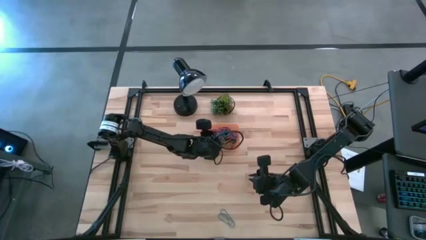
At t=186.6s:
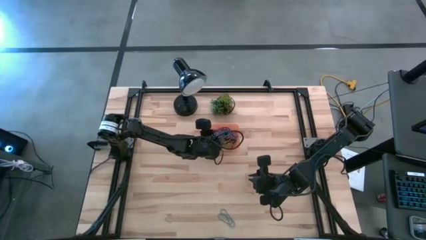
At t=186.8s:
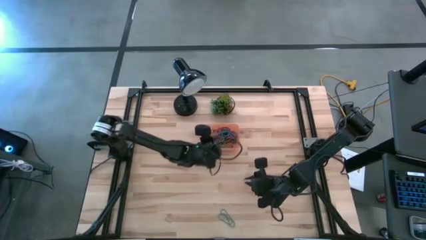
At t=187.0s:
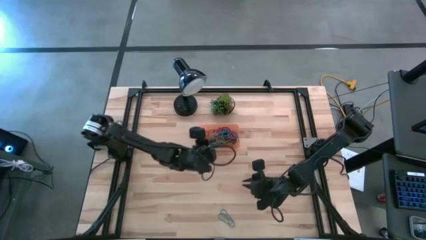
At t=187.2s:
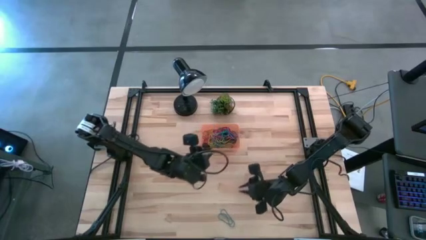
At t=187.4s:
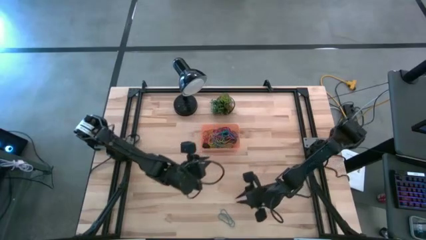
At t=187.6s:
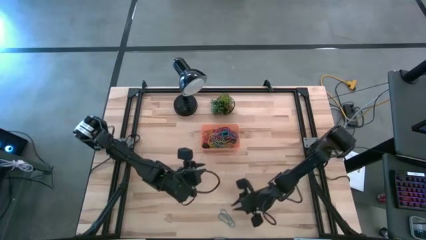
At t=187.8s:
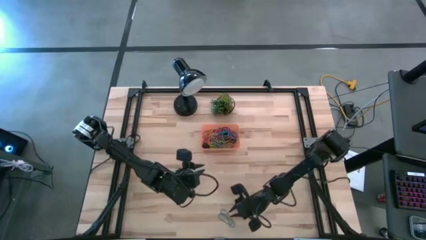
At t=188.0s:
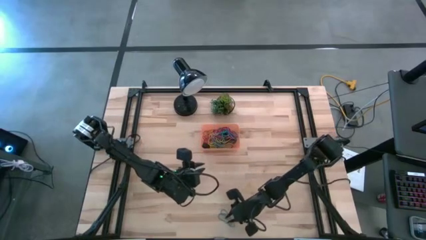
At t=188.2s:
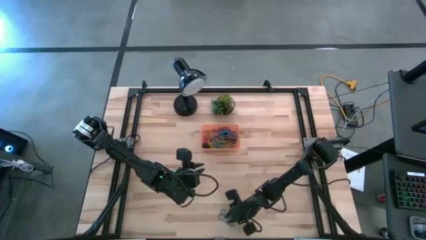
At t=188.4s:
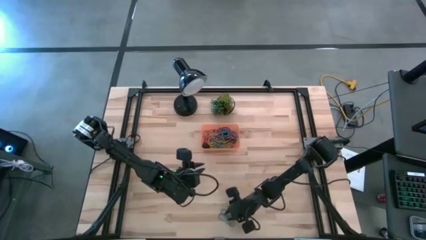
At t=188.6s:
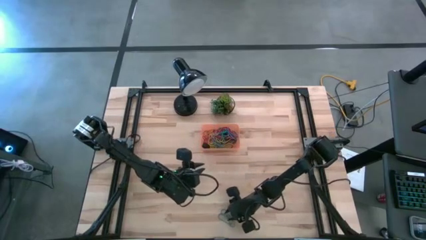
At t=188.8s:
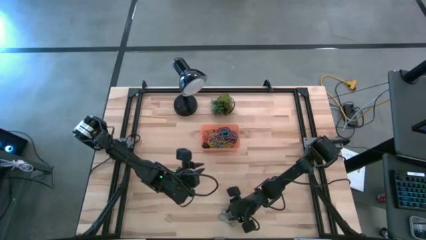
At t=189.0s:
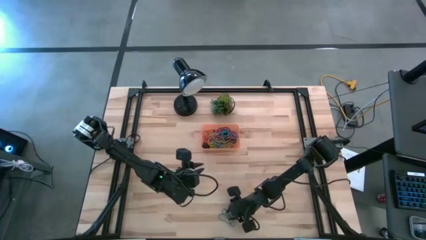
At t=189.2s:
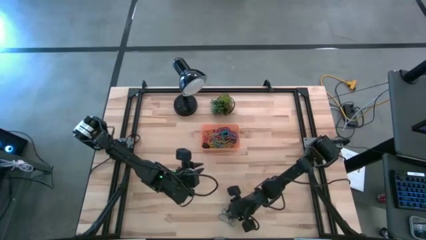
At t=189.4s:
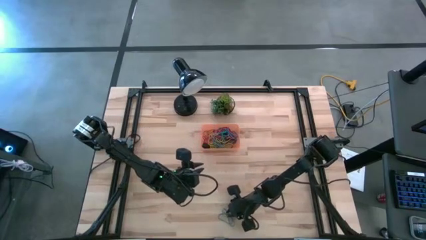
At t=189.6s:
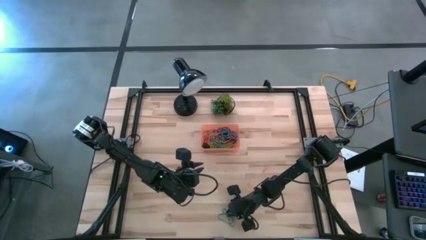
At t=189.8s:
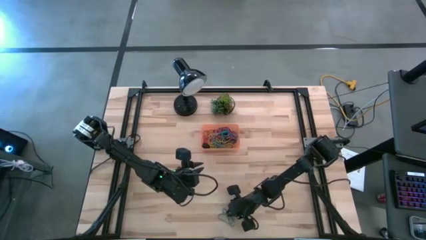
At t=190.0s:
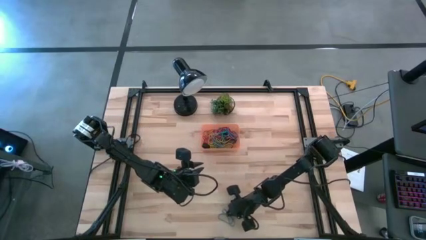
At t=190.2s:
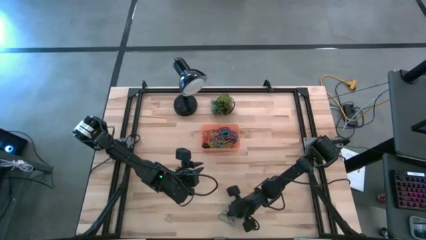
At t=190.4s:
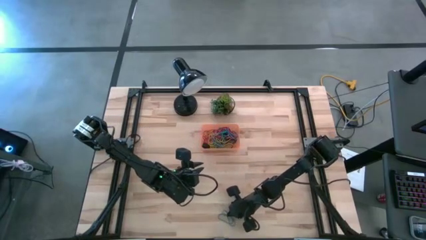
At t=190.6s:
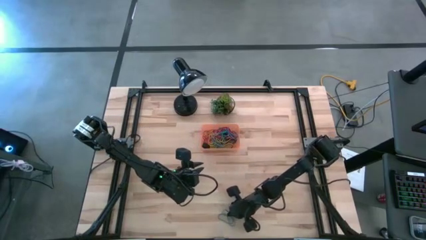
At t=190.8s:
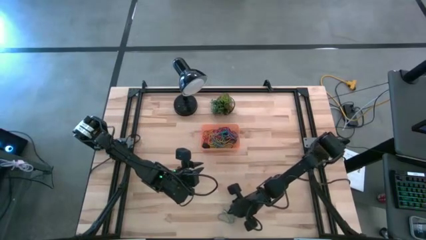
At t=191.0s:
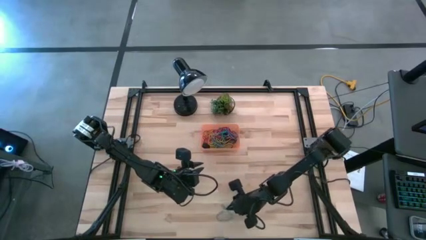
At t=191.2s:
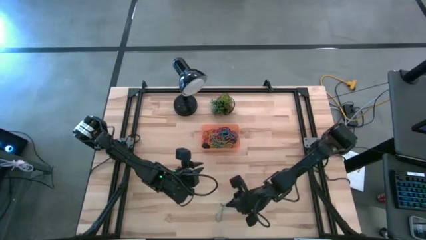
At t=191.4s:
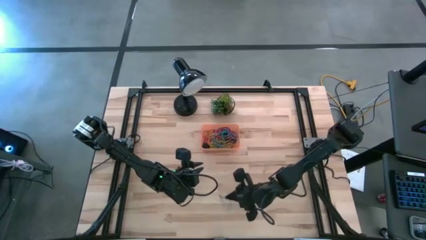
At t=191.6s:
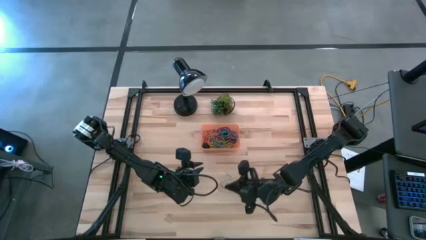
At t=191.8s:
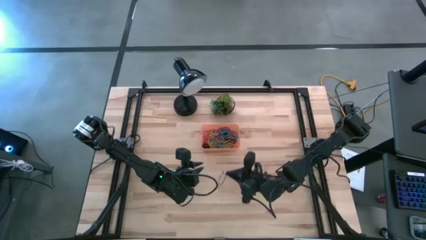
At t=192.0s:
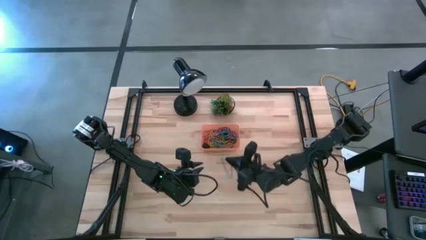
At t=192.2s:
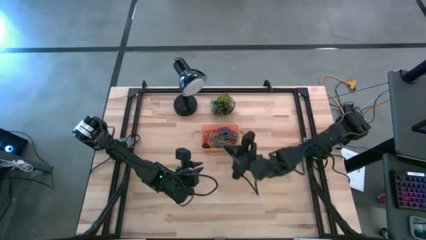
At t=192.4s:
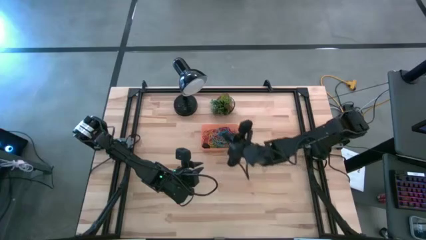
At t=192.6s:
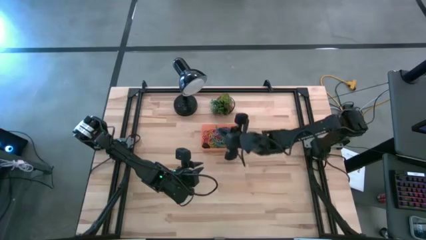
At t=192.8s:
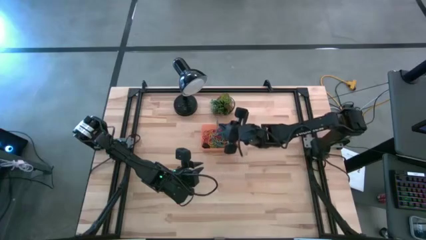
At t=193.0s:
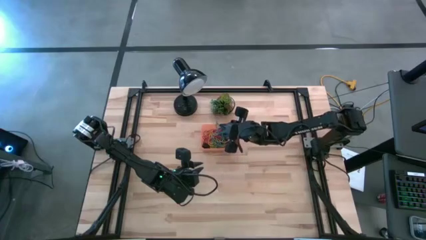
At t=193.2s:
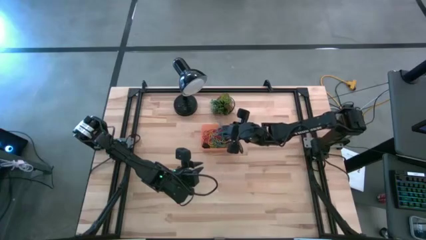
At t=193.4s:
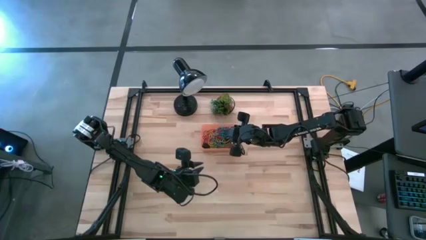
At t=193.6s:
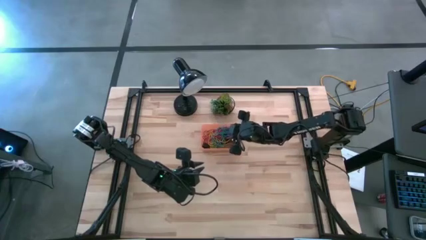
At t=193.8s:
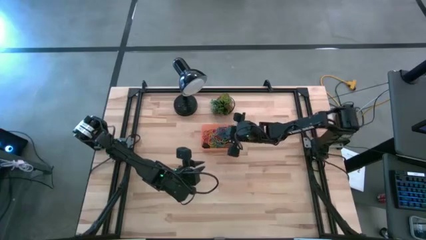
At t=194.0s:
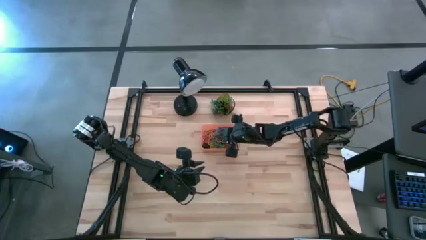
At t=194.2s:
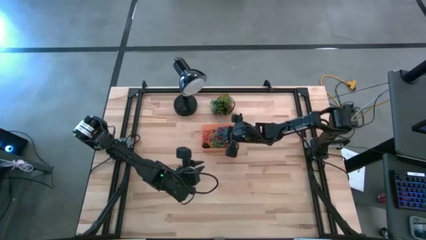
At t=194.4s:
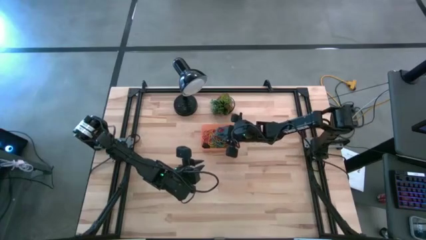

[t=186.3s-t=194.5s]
Task: Pick and place rubber bands into bin
Put the blue rubber band into the orange bin

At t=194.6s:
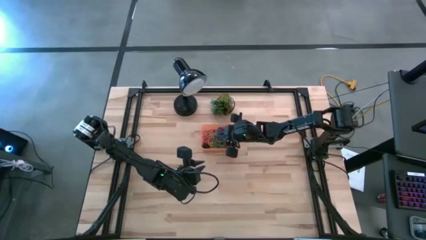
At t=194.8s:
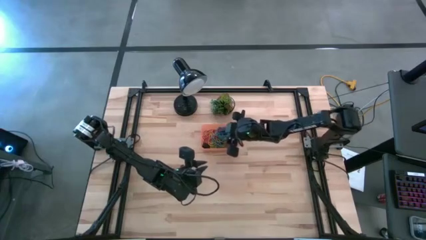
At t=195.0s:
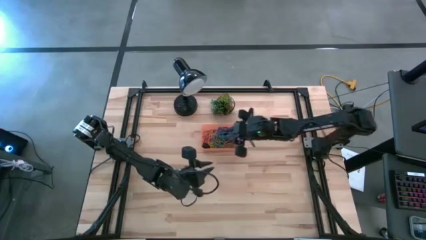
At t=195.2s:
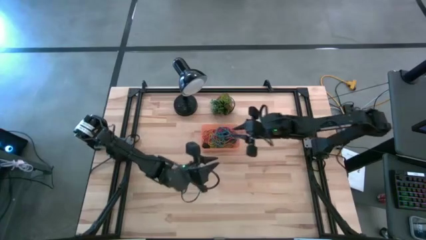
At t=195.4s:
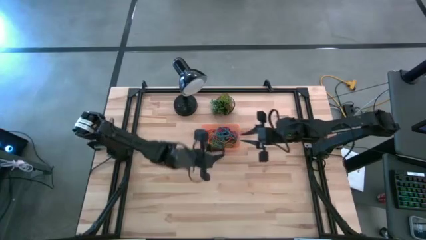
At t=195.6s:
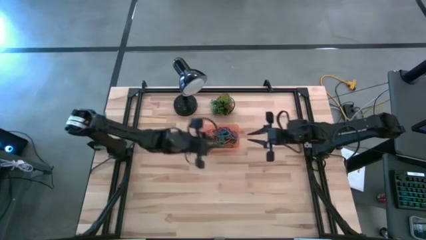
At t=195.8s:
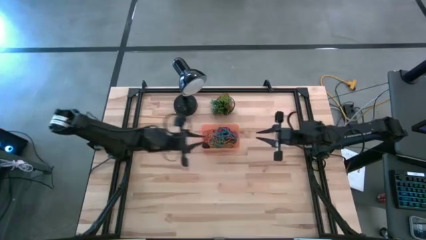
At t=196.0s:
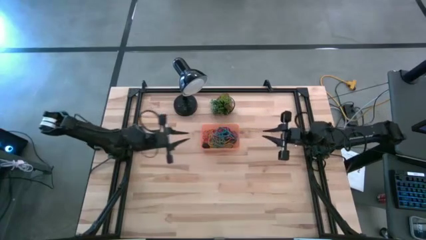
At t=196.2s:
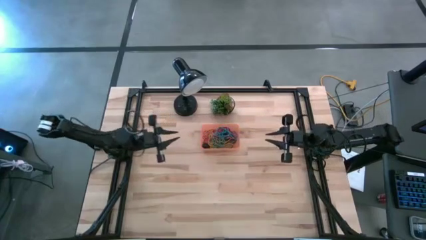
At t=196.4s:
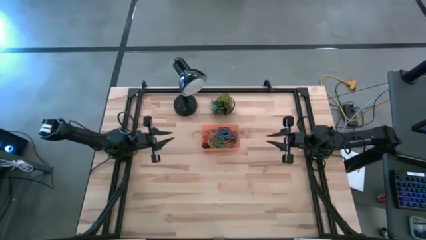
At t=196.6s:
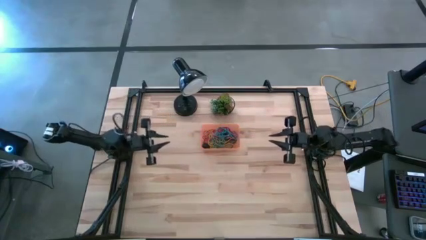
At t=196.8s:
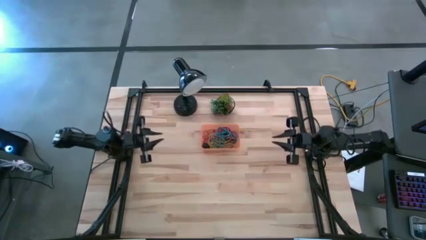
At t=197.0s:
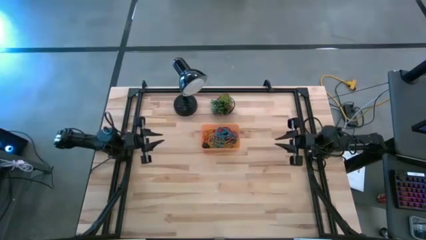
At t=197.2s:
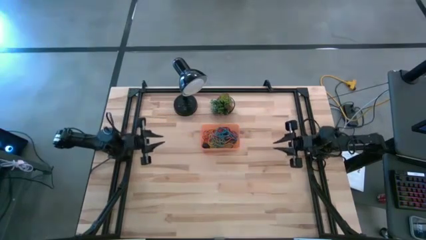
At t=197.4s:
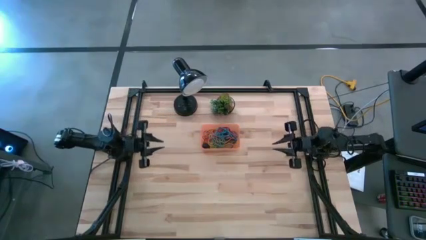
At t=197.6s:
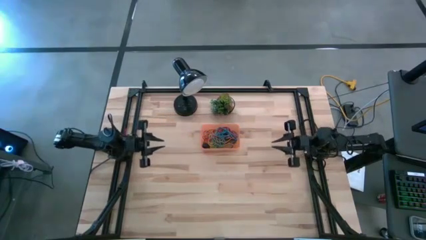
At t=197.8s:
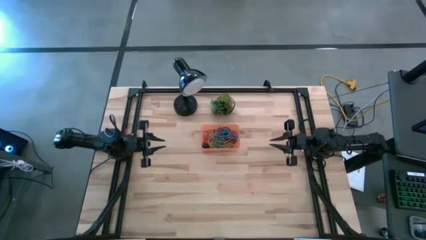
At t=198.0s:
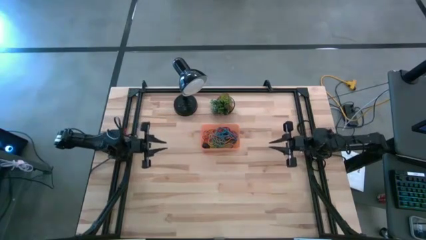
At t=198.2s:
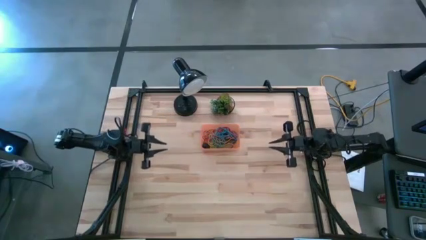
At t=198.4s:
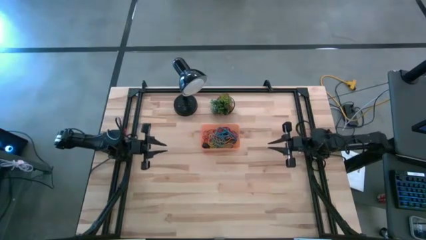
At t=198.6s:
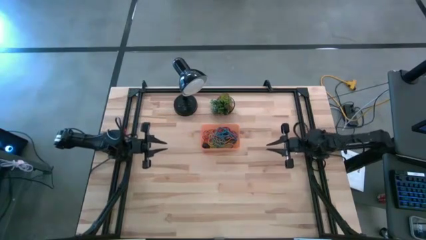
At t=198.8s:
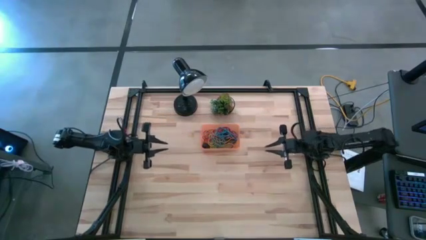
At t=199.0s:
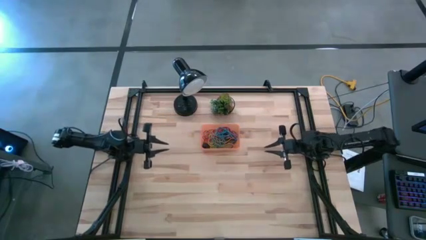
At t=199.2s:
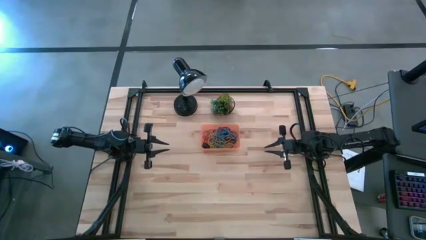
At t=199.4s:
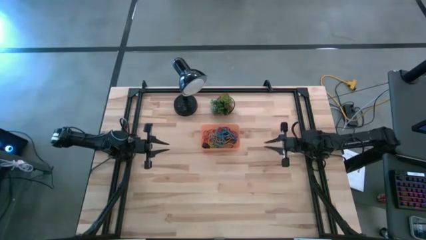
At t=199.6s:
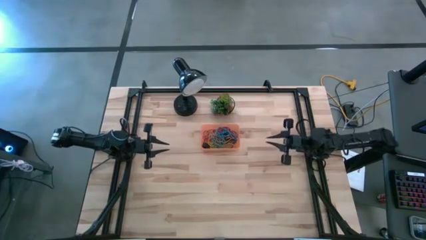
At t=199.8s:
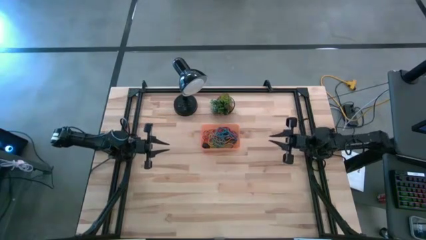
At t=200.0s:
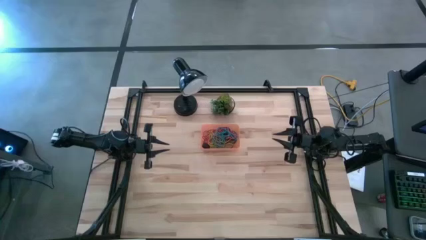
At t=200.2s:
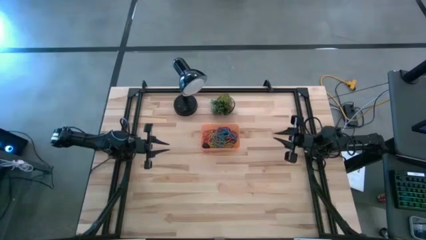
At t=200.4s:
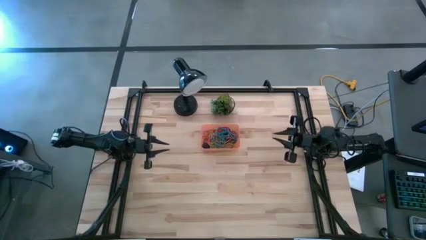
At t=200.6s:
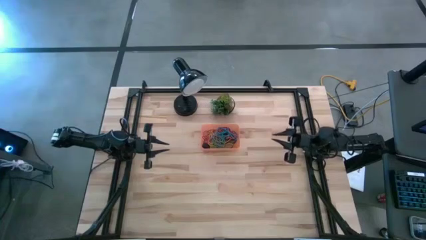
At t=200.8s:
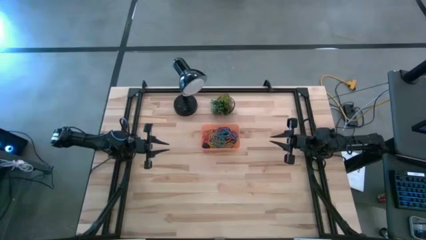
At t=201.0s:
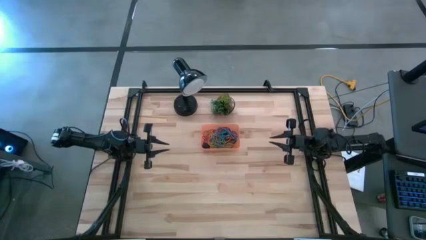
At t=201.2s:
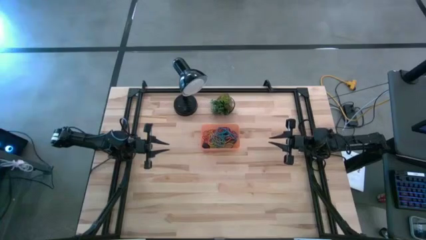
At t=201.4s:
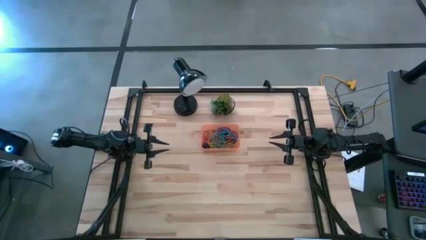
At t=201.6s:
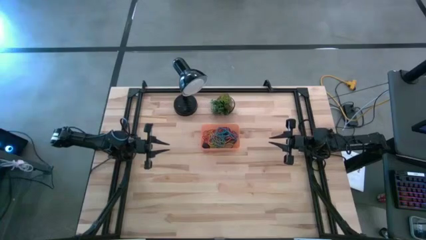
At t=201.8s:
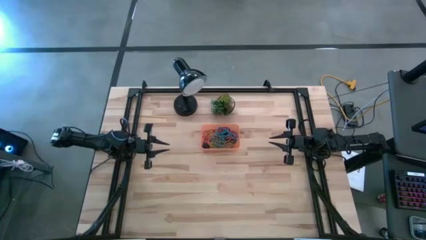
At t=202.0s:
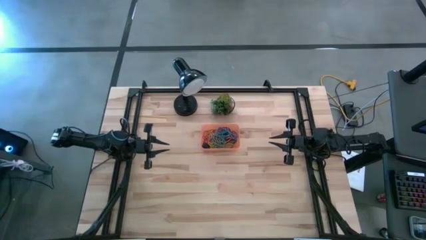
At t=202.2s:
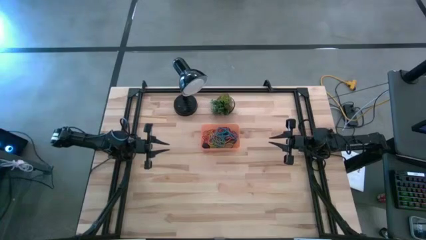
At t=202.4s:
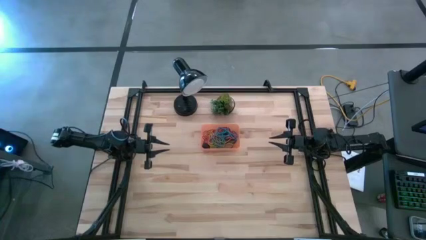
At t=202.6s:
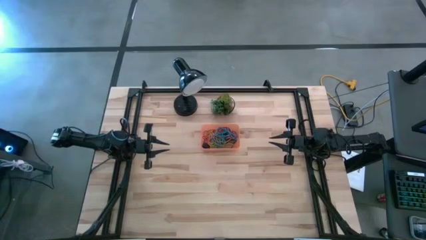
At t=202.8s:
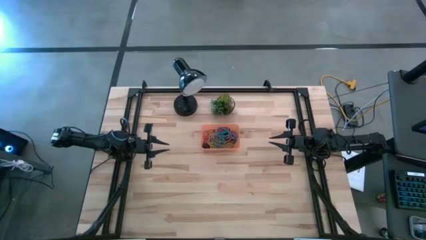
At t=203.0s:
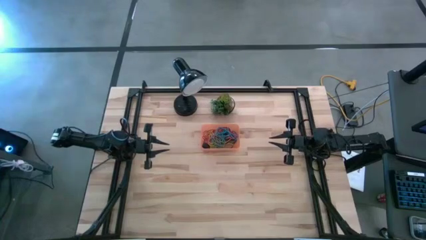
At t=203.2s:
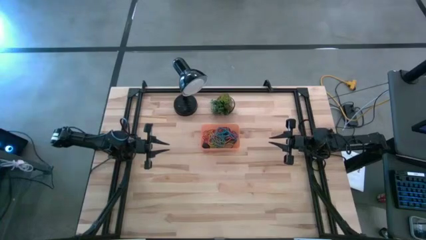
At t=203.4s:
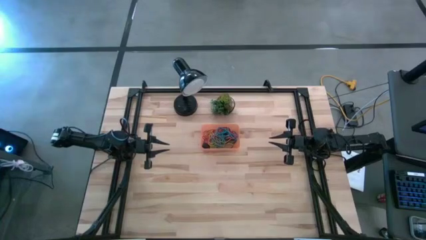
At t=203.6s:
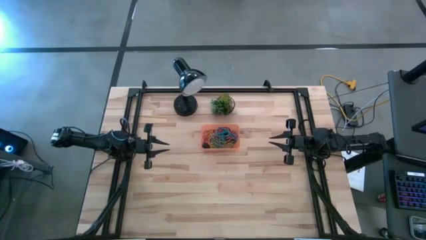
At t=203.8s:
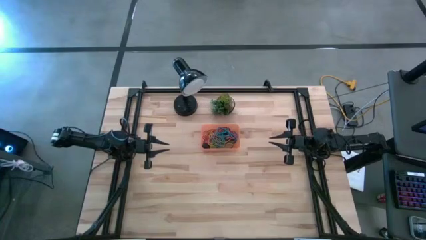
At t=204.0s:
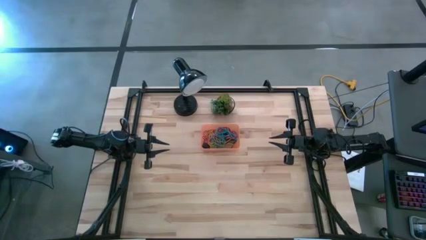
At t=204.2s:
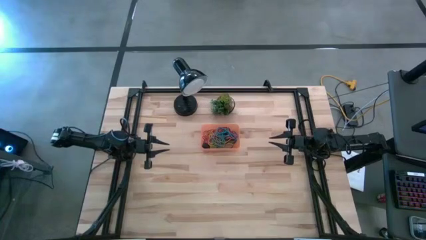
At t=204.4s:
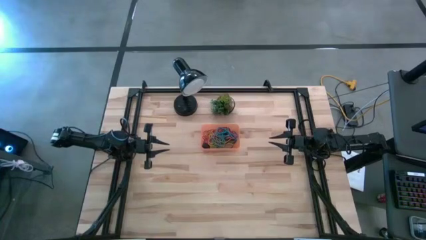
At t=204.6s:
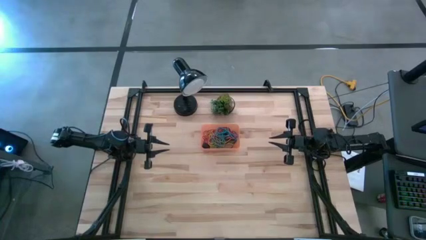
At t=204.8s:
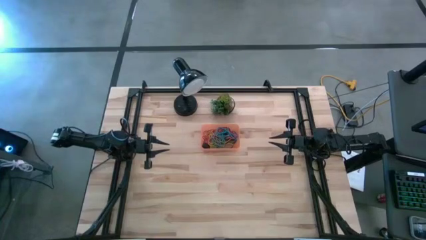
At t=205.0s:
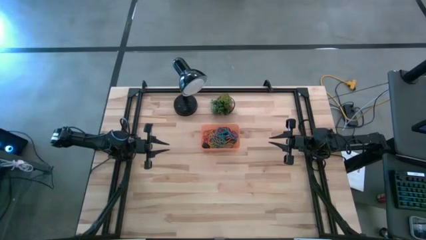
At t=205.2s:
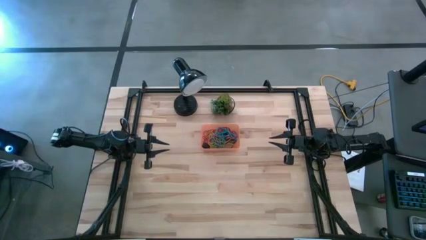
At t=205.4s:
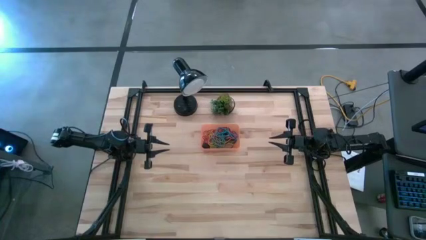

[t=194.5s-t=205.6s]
Return to Home Position
